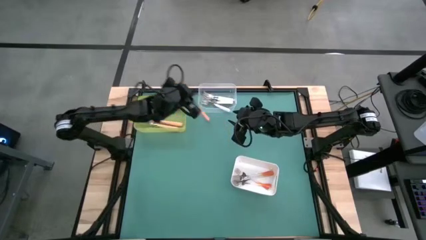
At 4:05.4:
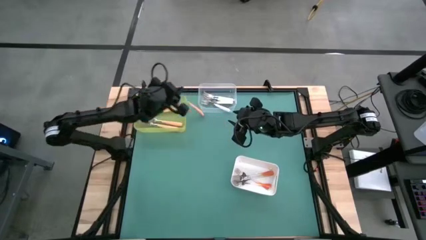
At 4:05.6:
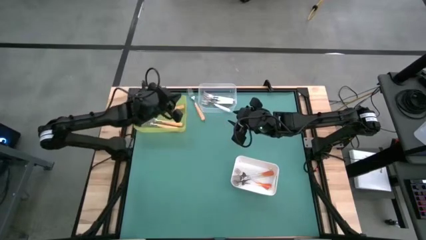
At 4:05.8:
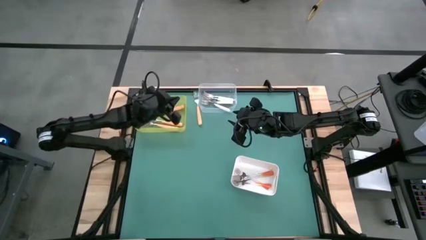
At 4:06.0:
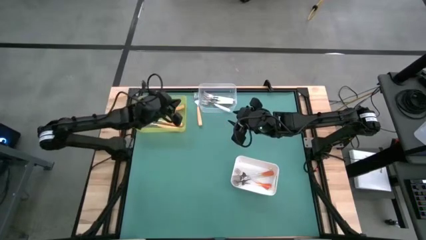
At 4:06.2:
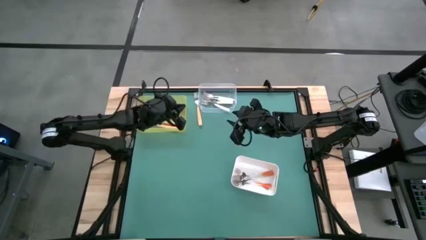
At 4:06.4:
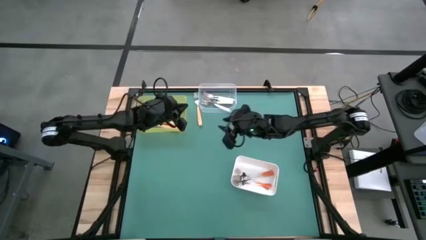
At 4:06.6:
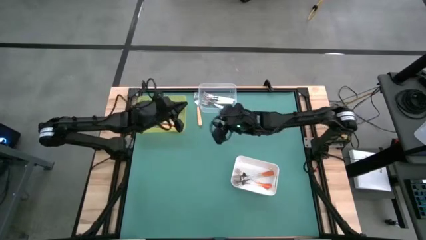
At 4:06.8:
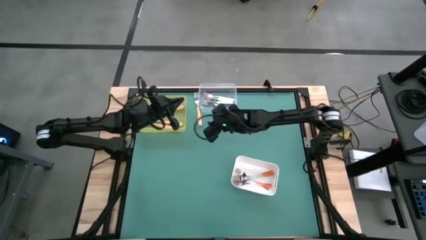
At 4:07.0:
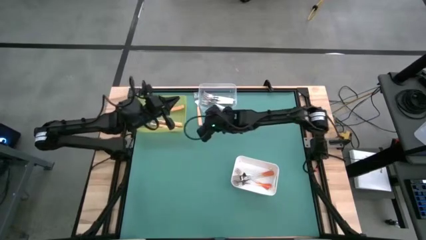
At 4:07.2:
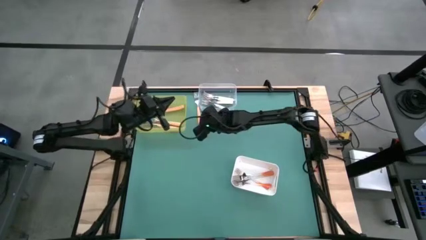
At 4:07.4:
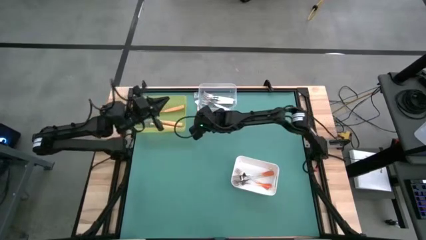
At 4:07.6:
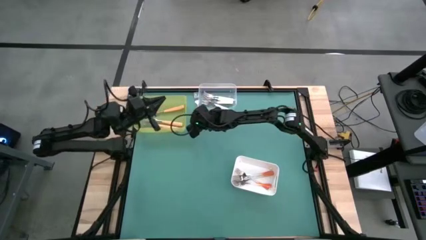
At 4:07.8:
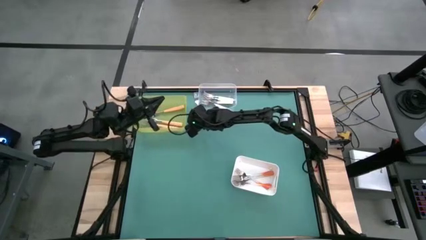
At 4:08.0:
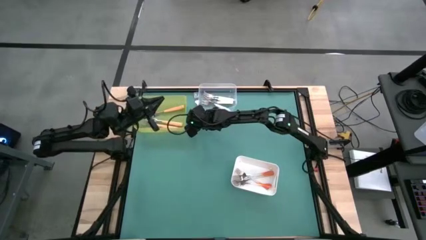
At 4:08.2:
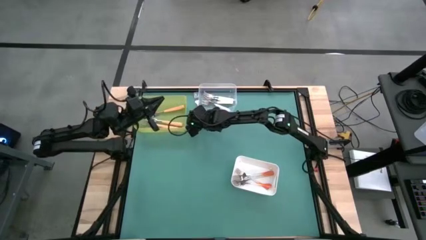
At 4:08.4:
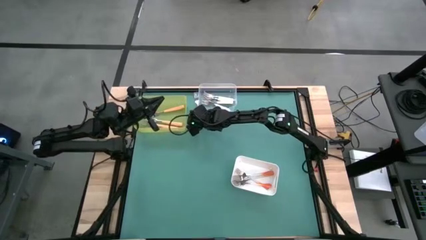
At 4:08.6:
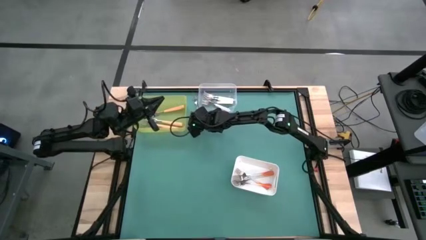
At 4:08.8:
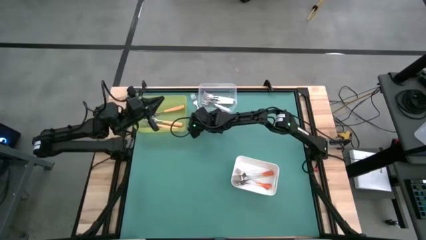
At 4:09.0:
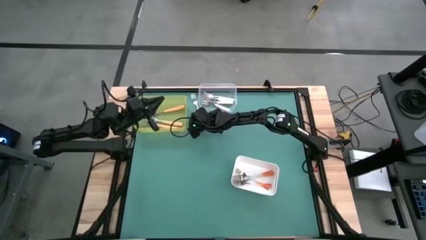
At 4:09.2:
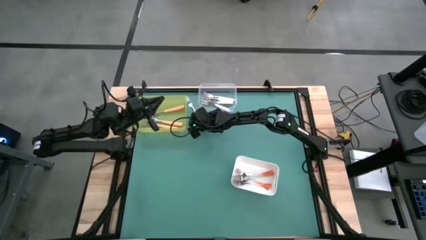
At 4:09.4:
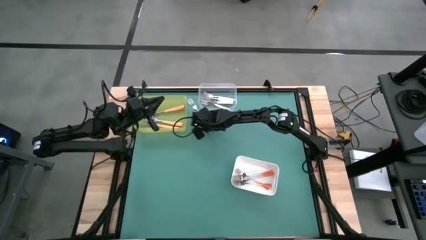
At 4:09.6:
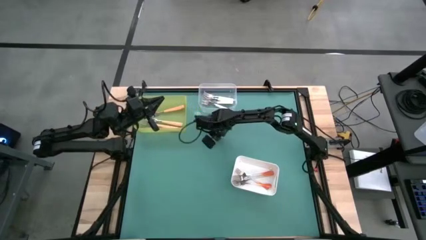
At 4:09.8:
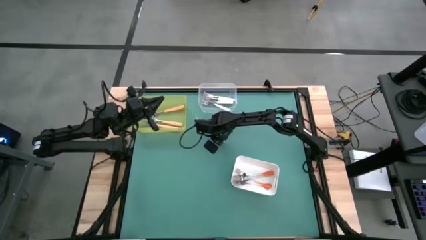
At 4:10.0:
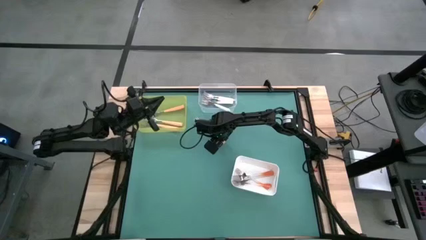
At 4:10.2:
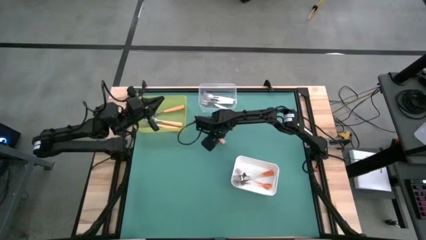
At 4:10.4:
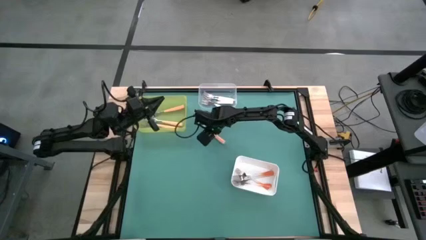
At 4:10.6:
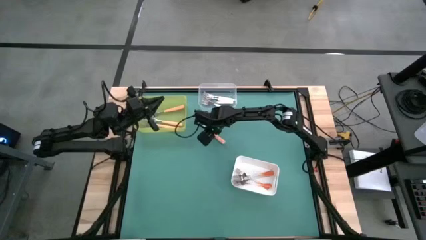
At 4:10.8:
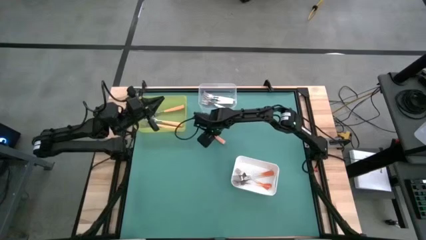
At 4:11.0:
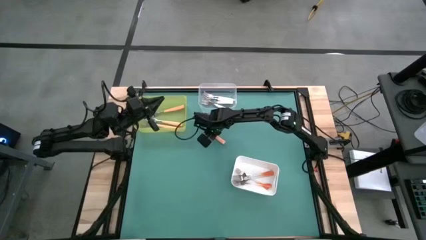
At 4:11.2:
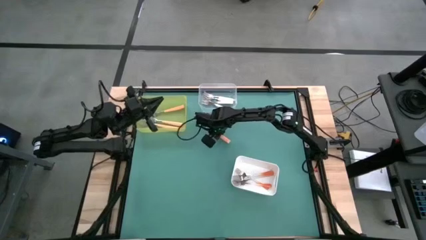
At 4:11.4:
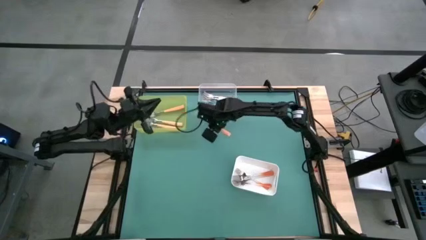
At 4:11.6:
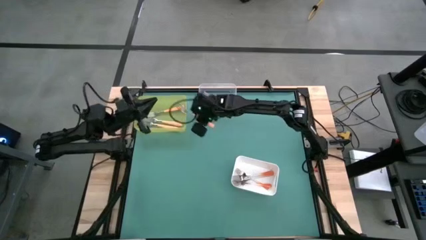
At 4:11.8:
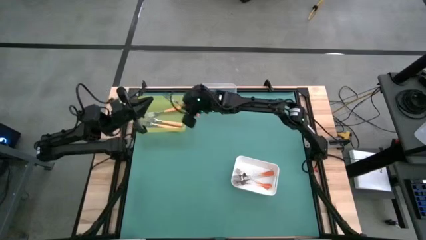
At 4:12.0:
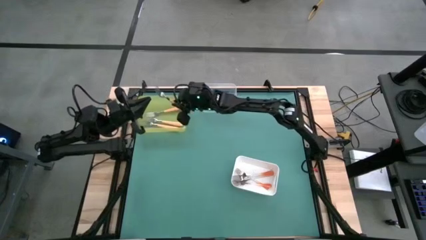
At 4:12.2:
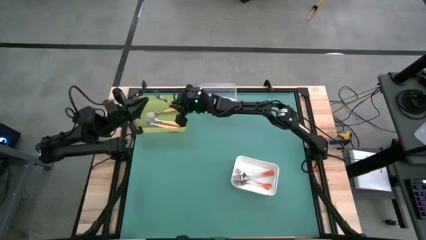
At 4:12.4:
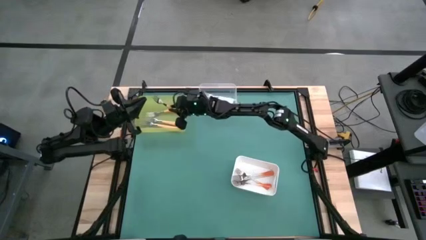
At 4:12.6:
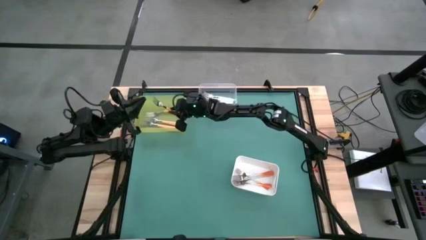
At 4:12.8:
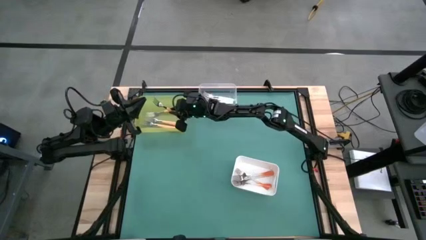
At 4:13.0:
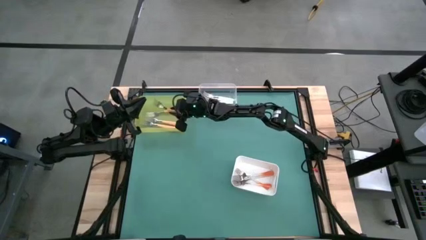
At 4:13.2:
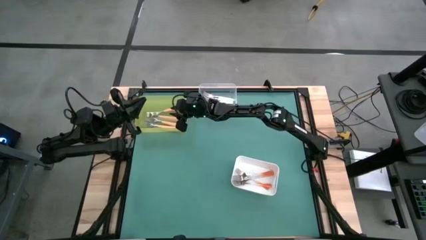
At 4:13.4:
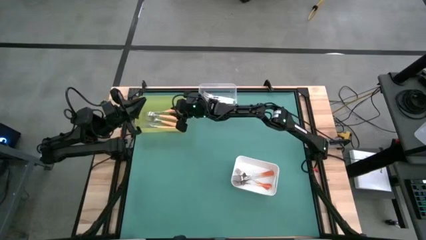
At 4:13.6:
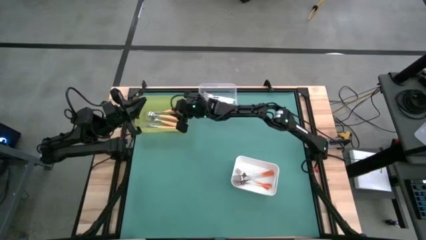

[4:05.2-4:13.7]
Task: Sort silverware by color (type)
Put the light orange into the yellow bin

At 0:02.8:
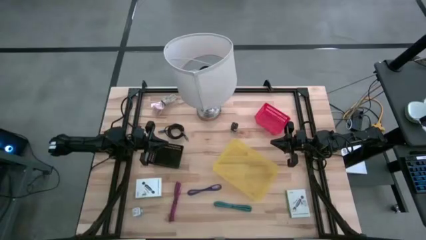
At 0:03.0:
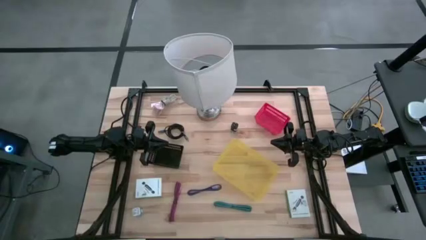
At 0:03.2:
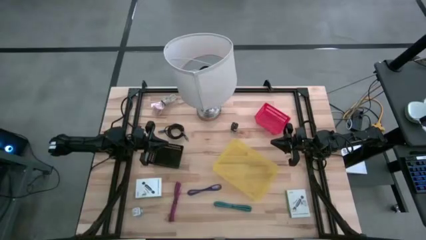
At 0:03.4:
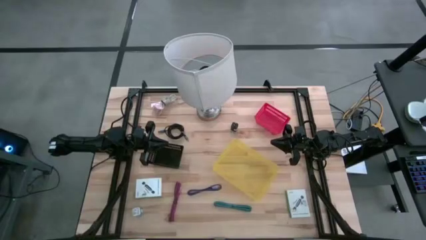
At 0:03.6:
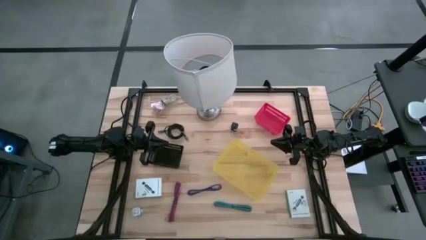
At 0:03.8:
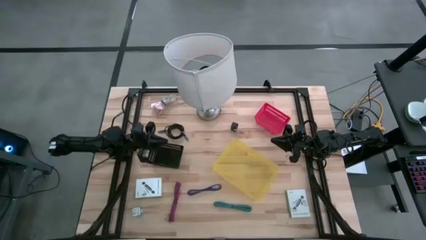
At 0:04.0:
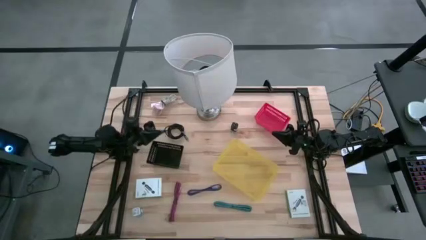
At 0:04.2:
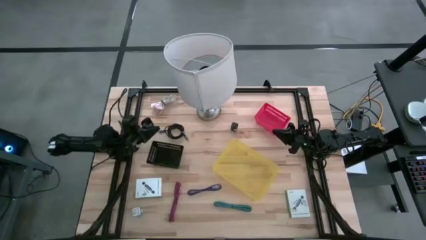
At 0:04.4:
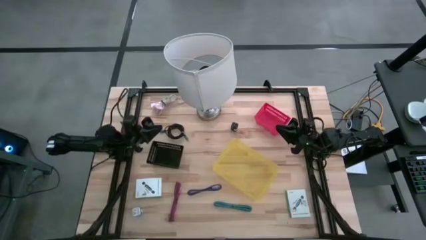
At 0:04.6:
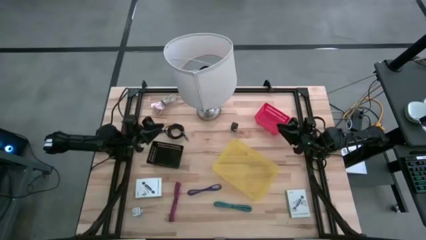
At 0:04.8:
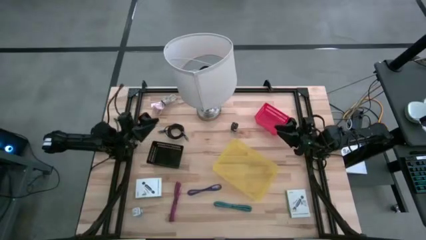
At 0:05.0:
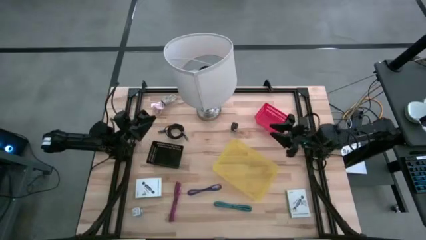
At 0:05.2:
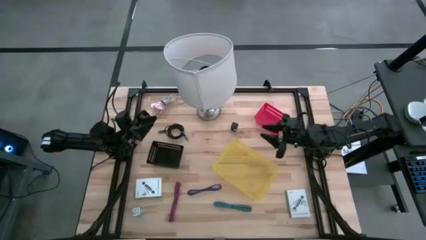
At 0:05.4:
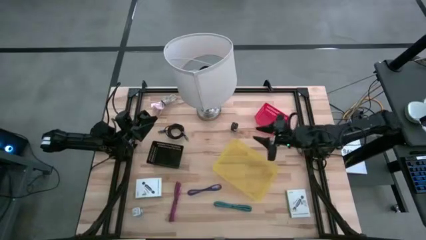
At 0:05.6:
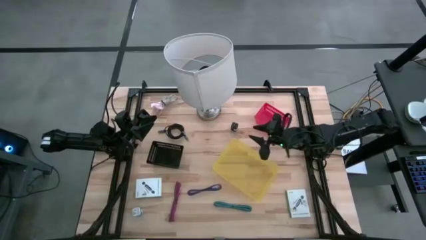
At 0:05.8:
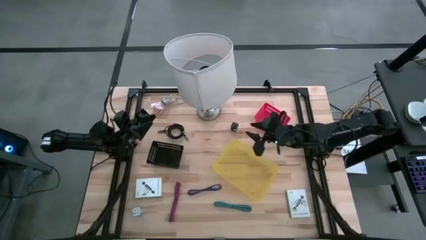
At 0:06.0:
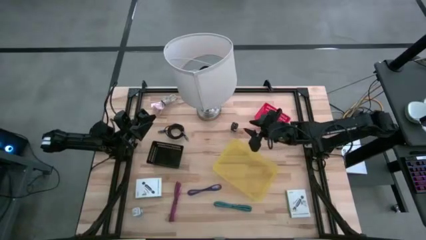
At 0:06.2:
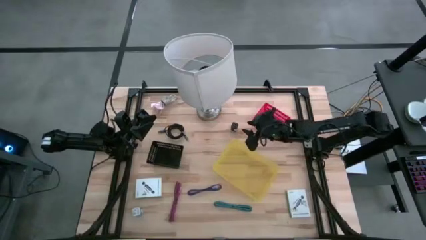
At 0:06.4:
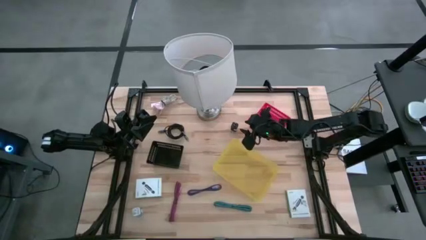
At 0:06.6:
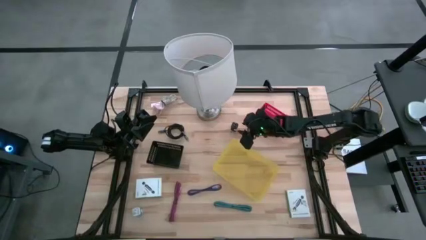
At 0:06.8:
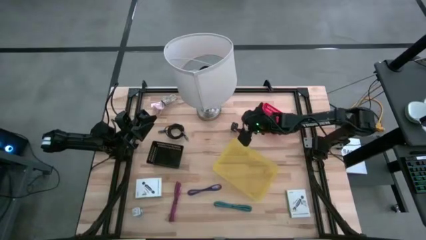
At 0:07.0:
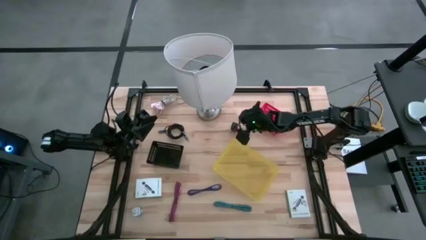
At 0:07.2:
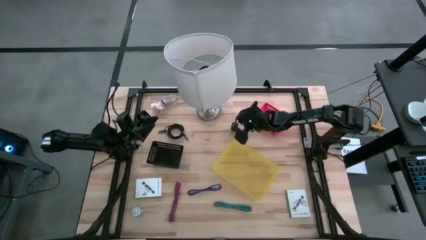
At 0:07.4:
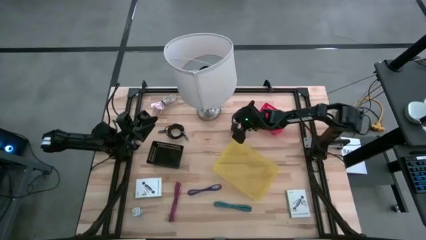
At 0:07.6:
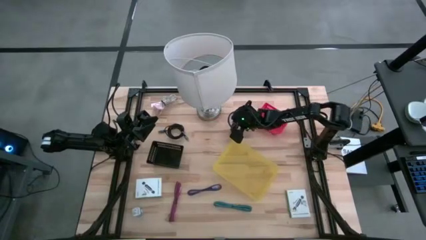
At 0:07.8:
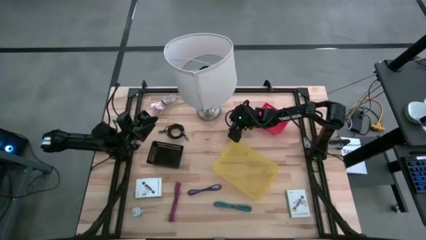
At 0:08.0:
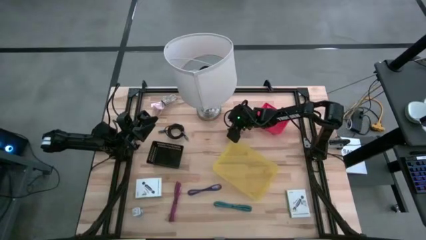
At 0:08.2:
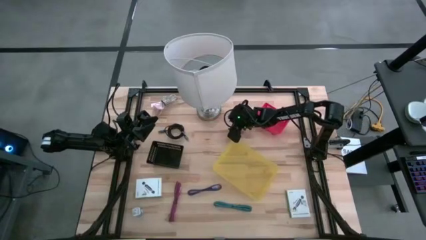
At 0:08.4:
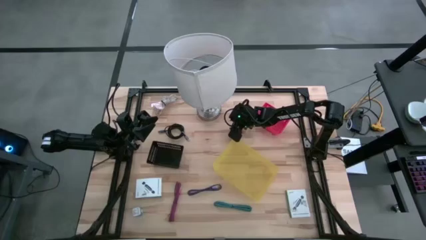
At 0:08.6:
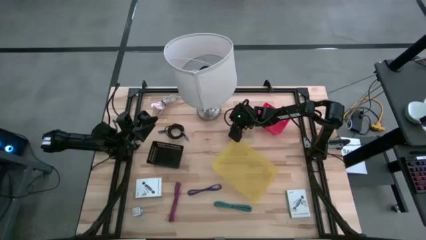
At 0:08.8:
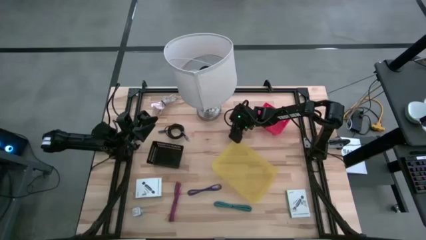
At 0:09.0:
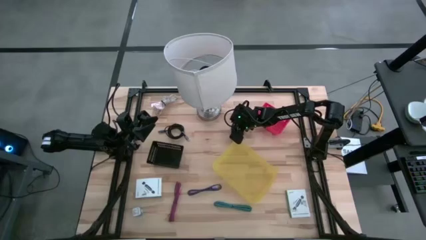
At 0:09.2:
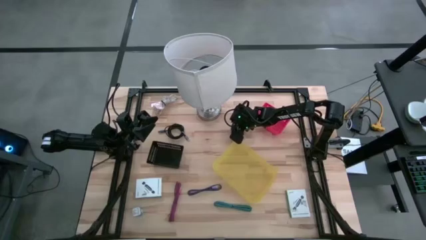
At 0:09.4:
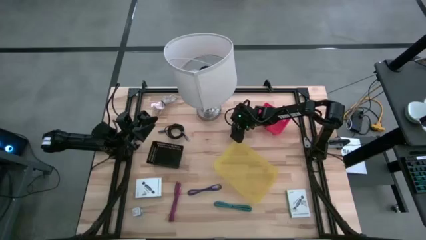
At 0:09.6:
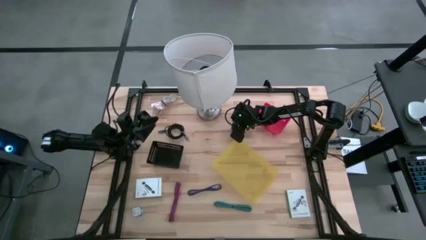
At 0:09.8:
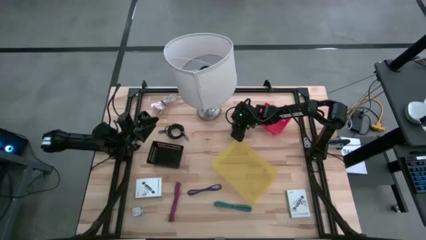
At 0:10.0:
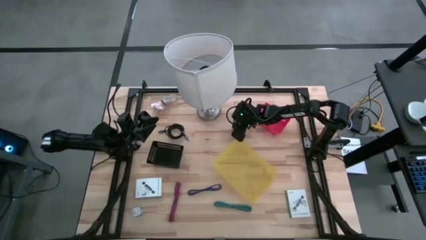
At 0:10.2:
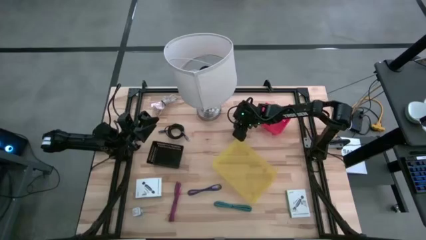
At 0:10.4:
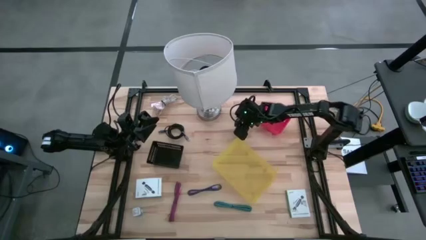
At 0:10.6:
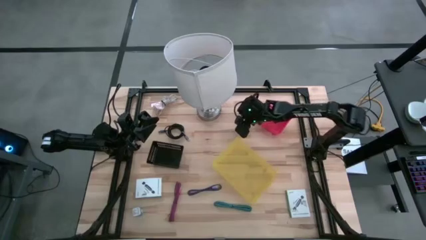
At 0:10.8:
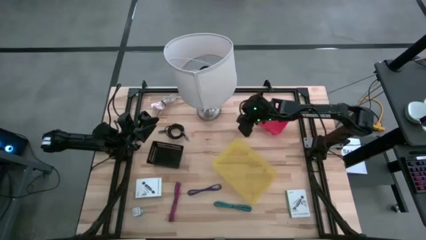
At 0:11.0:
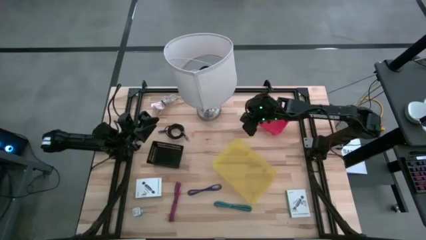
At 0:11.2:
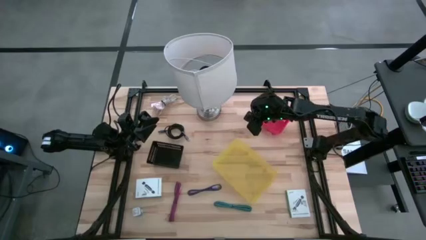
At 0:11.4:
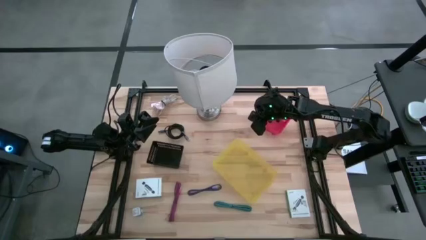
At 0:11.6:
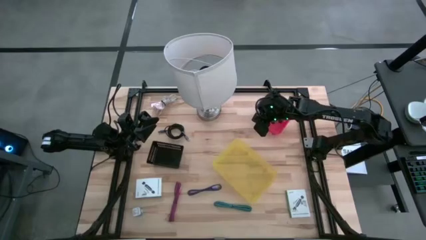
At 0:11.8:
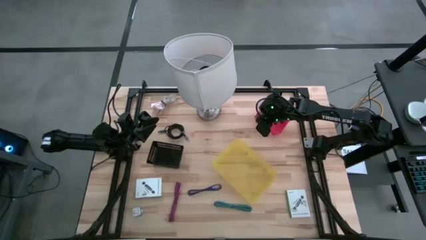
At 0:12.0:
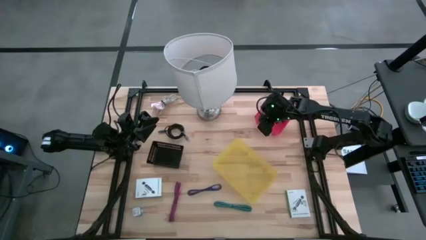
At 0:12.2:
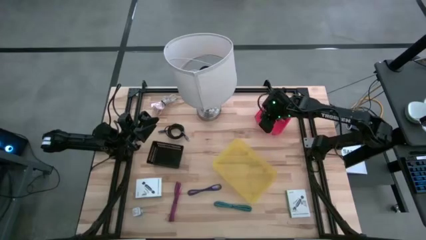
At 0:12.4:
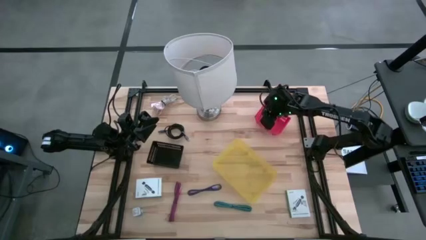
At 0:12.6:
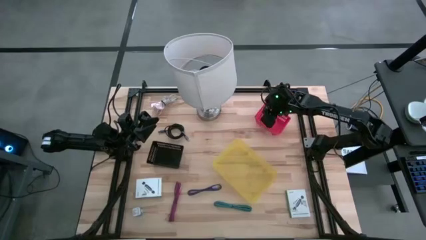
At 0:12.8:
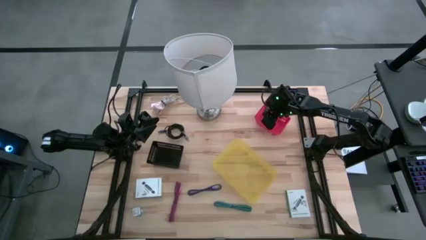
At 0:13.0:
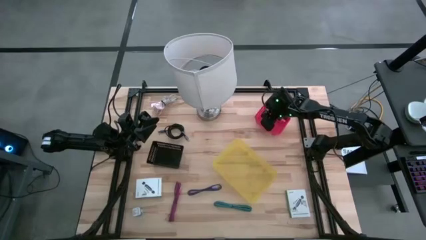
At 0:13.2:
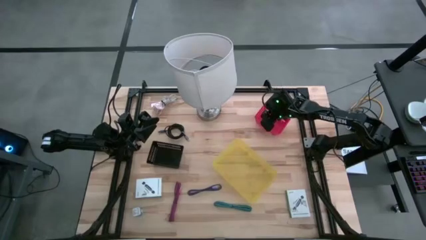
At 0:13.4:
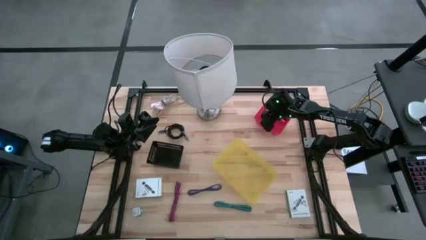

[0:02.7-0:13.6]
Task: Pick and place items into bin
Put the black charger adapter into the red bin
